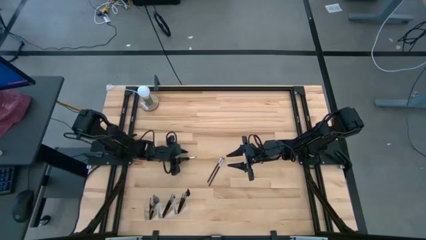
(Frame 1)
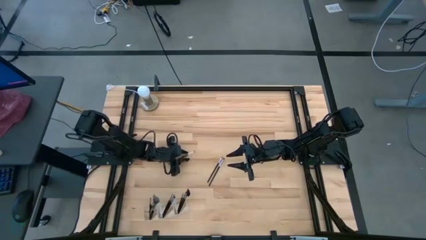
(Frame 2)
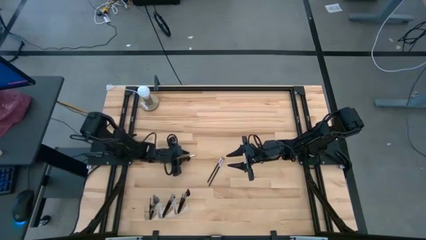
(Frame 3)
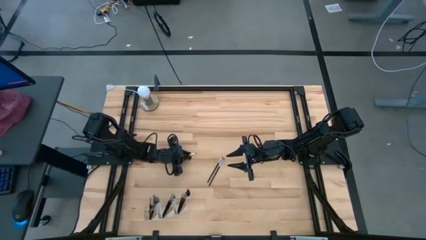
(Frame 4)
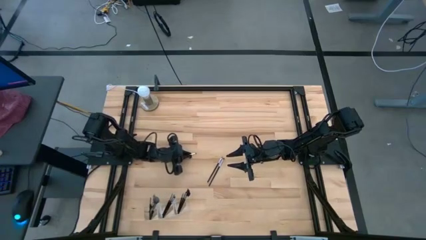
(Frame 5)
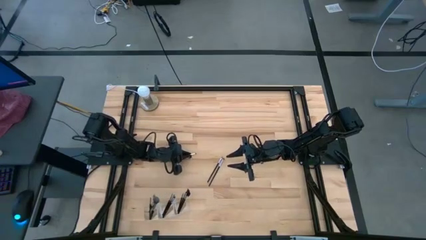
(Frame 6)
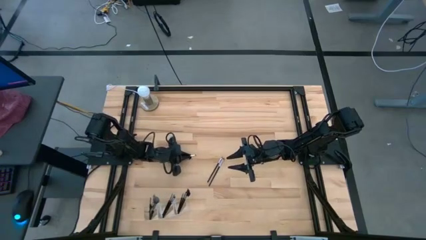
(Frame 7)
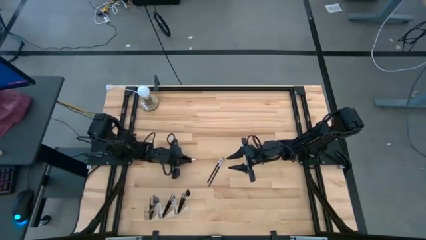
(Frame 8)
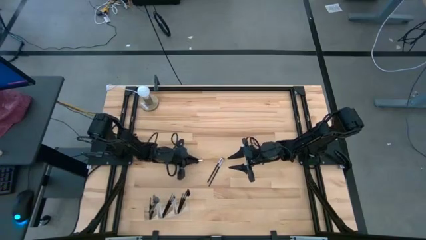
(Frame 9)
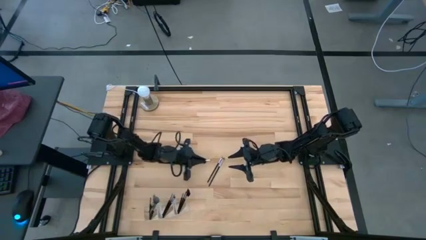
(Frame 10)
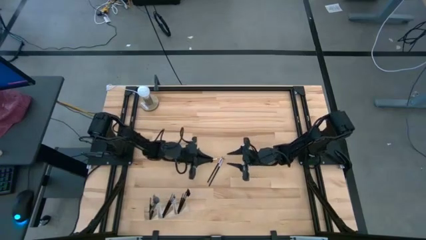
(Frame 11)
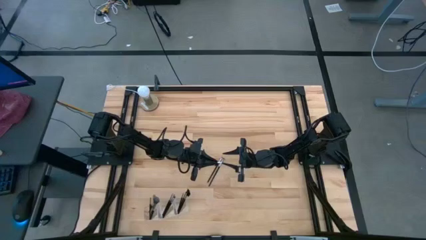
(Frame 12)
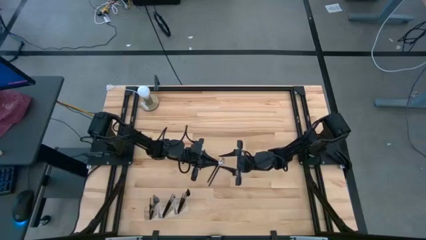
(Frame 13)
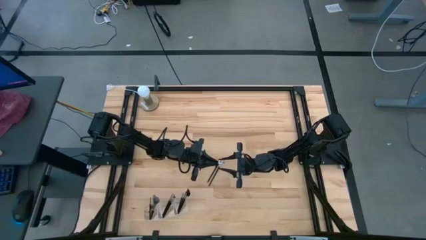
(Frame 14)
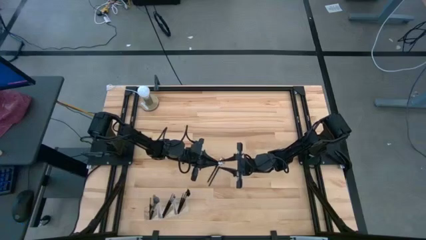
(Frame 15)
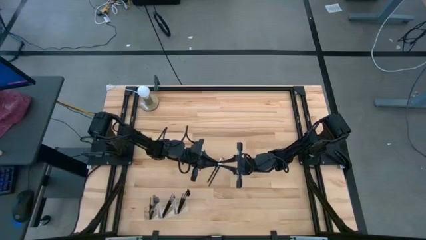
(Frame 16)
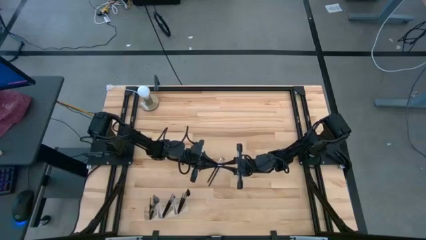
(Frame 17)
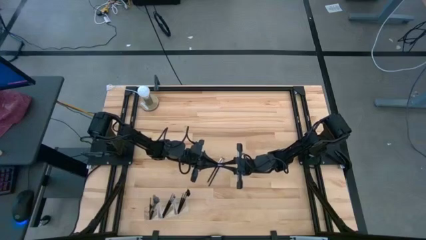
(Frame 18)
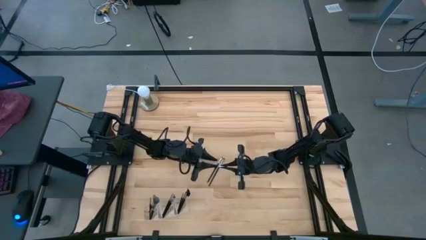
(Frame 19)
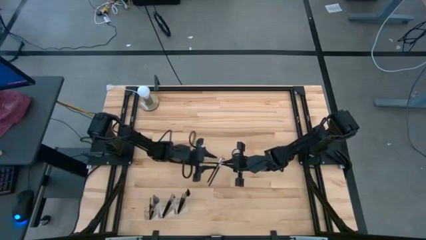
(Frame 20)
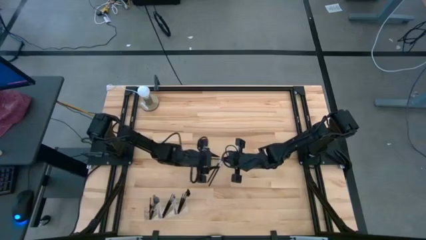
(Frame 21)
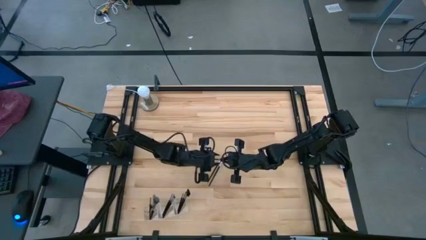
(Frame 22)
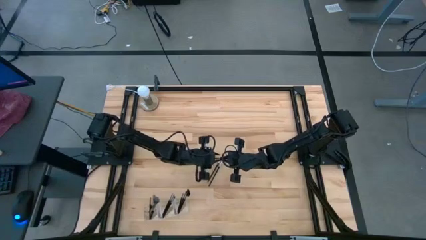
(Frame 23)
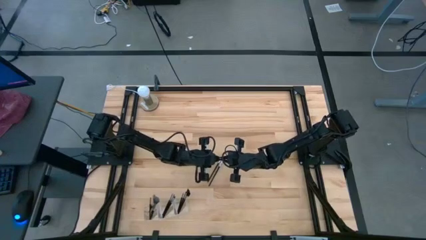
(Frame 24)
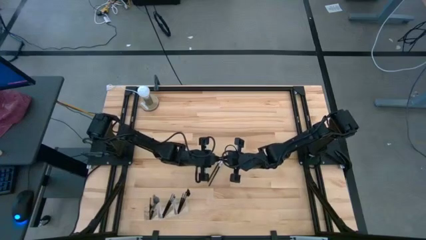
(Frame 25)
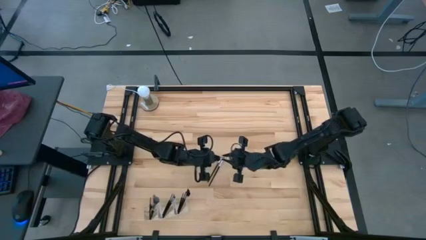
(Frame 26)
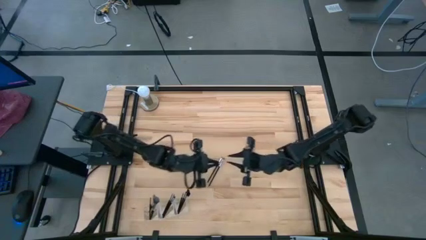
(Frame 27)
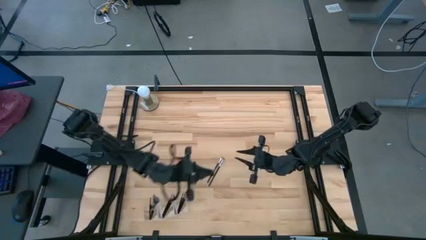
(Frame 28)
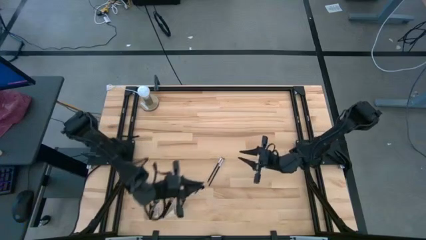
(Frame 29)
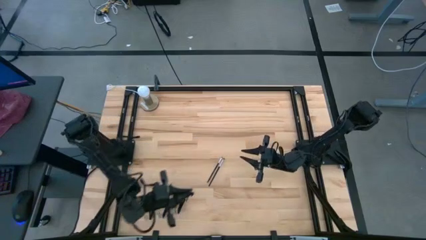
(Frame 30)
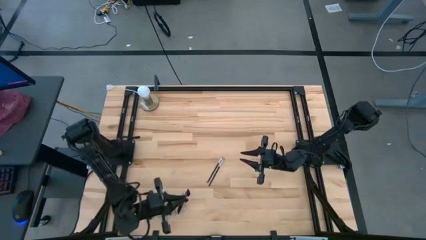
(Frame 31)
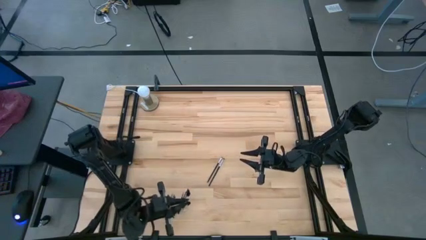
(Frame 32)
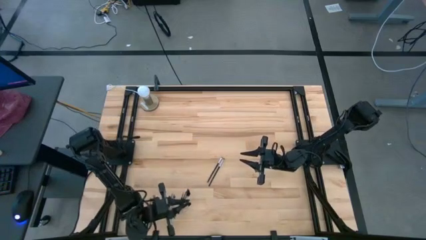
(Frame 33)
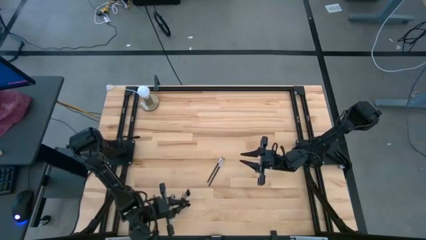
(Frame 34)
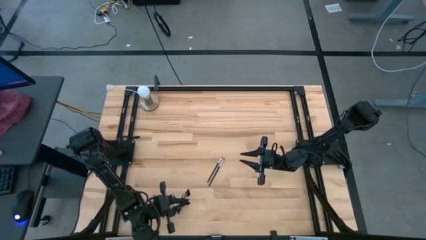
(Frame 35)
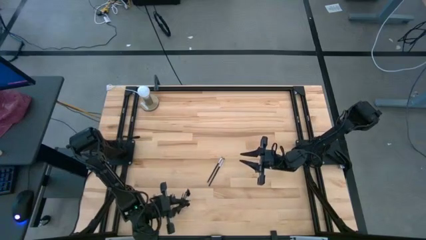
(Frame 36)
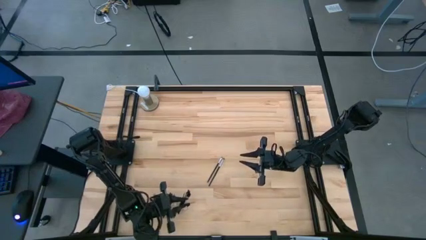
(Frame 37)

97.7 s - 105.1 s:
Task: Put items in baskets/containers
Put the black eyeshadow brush into the transparent organizer

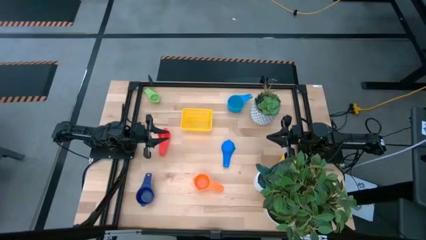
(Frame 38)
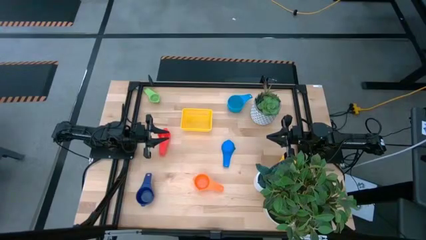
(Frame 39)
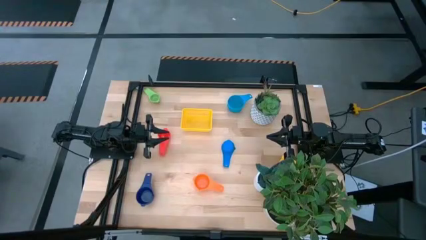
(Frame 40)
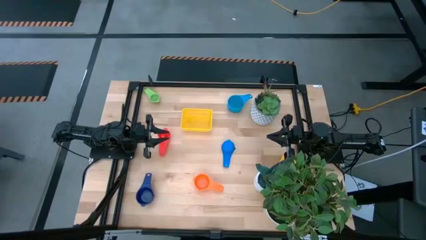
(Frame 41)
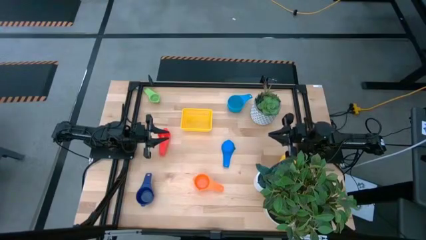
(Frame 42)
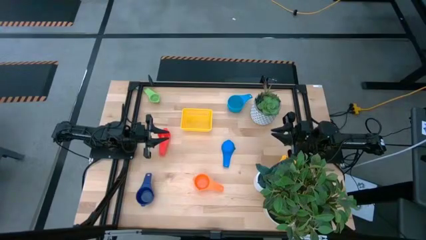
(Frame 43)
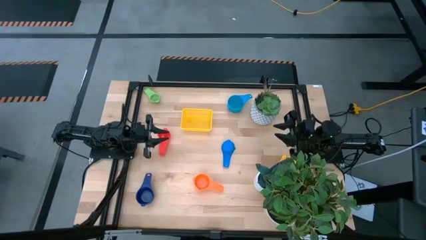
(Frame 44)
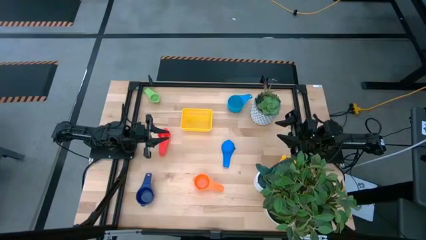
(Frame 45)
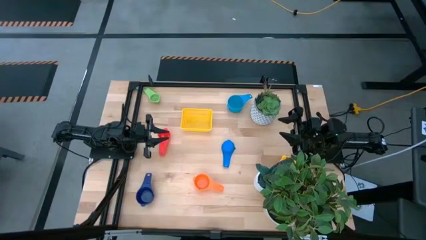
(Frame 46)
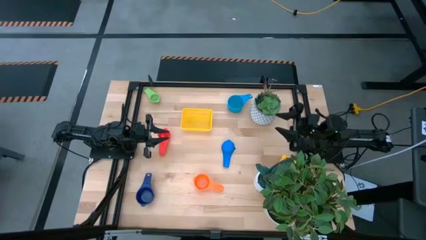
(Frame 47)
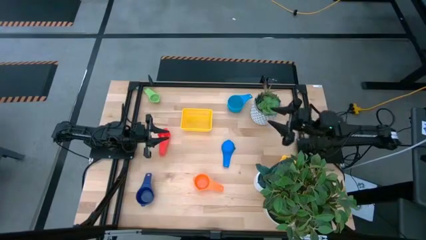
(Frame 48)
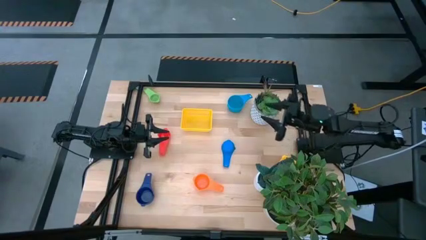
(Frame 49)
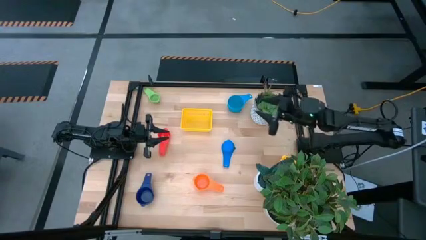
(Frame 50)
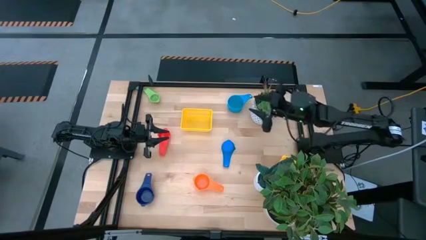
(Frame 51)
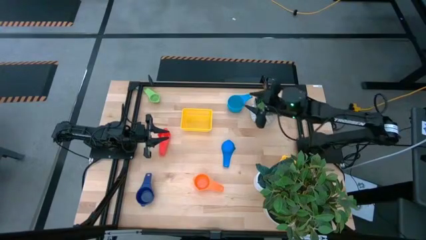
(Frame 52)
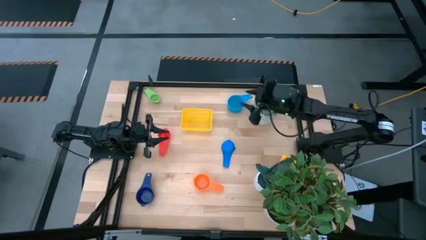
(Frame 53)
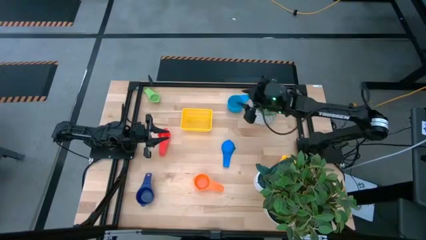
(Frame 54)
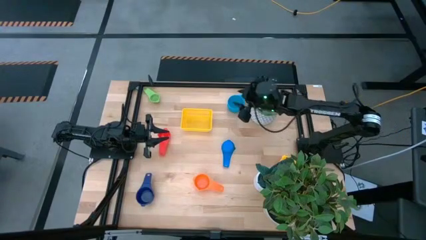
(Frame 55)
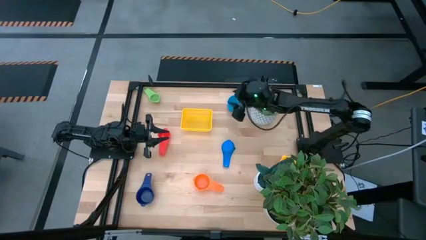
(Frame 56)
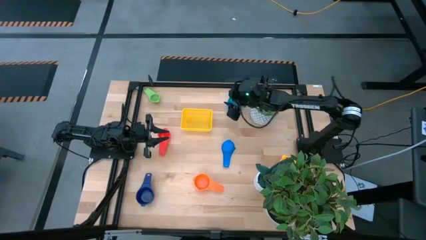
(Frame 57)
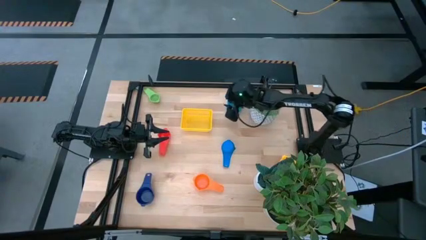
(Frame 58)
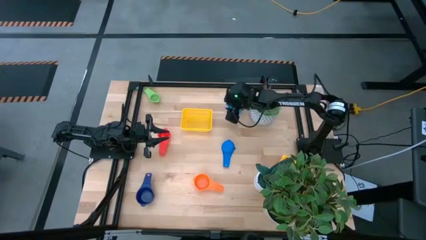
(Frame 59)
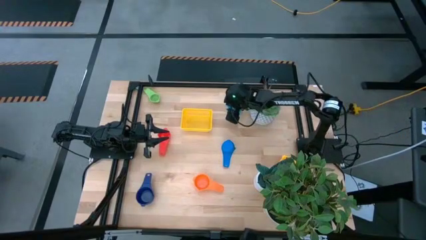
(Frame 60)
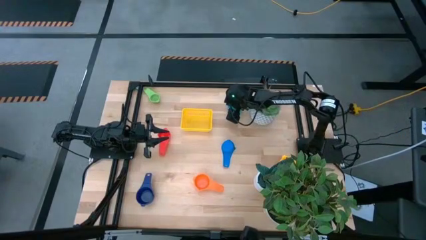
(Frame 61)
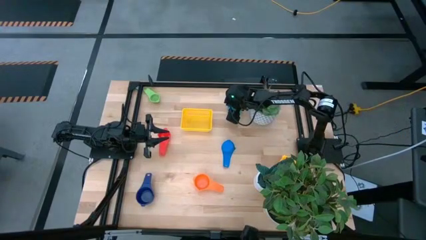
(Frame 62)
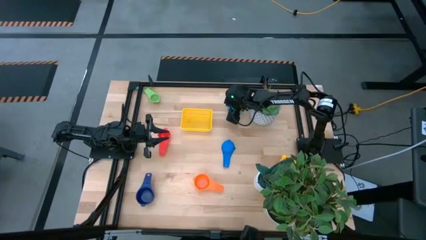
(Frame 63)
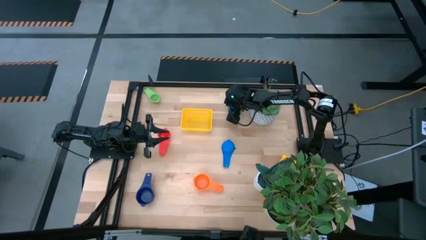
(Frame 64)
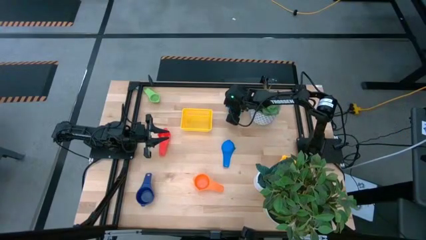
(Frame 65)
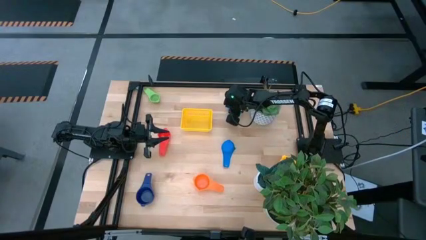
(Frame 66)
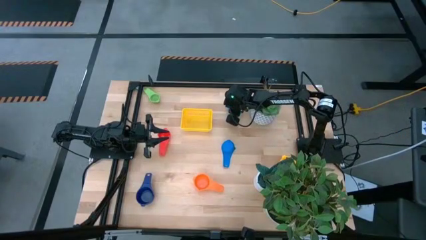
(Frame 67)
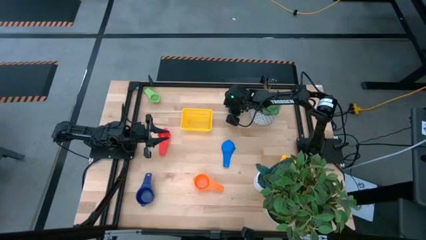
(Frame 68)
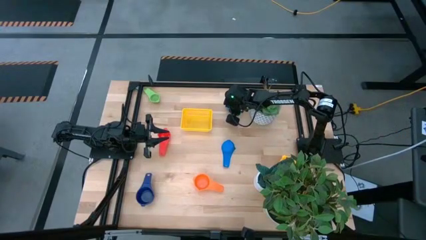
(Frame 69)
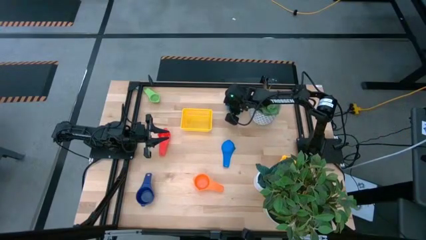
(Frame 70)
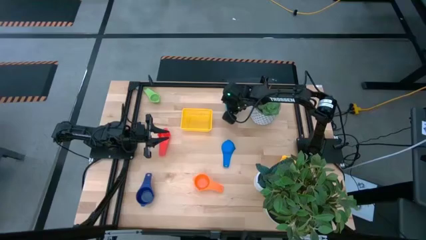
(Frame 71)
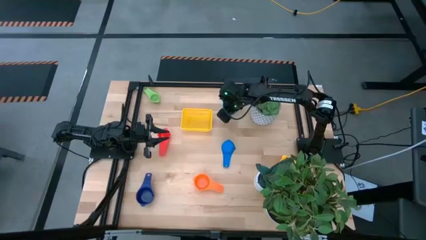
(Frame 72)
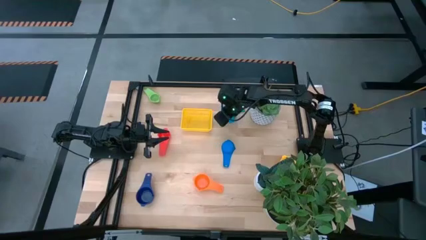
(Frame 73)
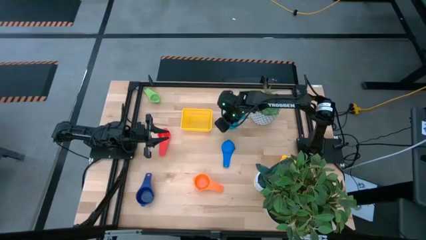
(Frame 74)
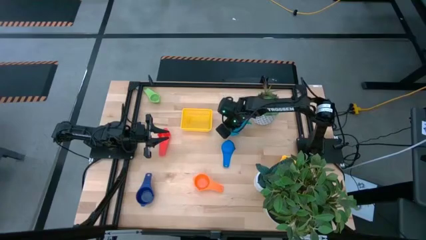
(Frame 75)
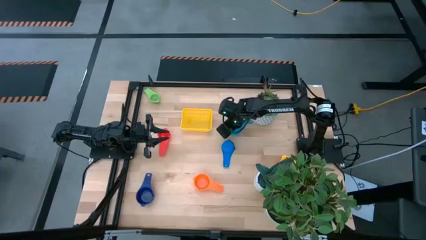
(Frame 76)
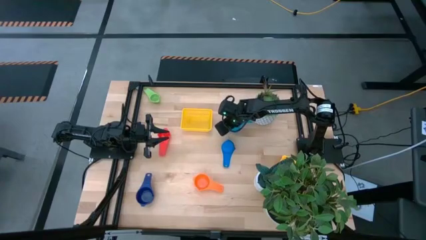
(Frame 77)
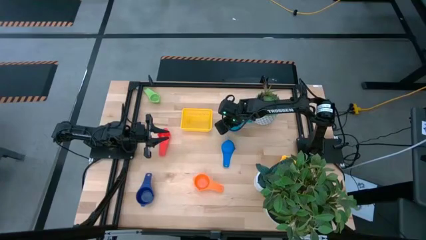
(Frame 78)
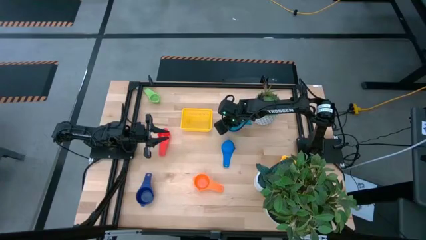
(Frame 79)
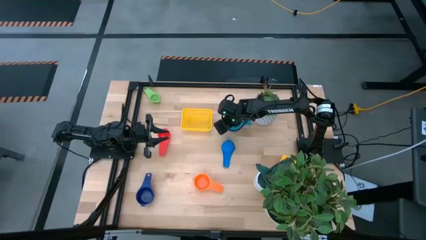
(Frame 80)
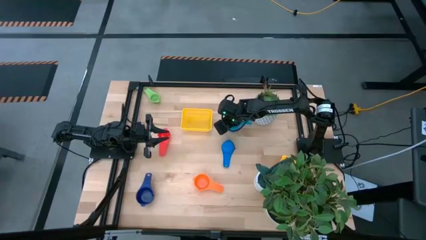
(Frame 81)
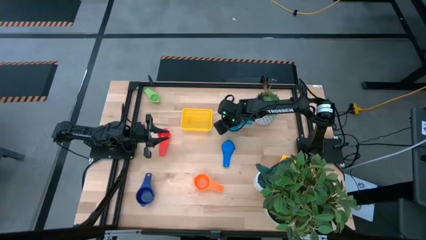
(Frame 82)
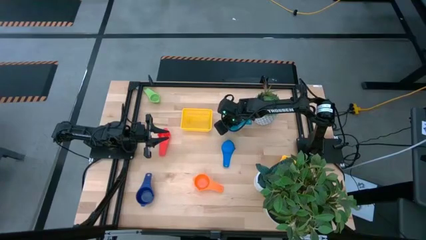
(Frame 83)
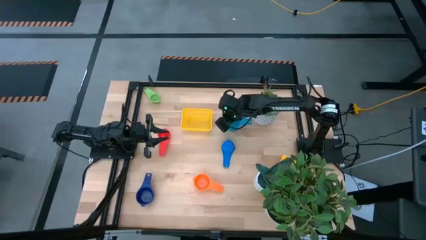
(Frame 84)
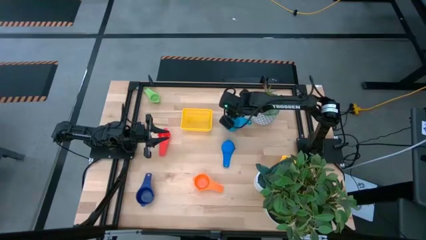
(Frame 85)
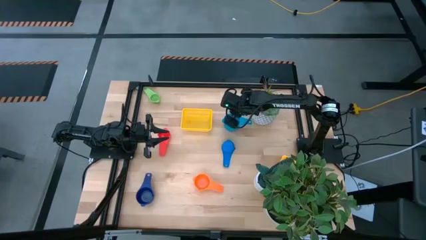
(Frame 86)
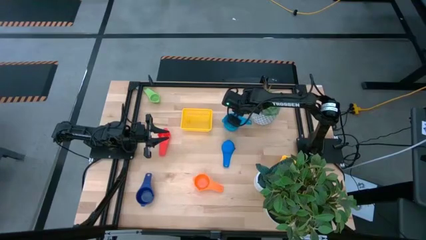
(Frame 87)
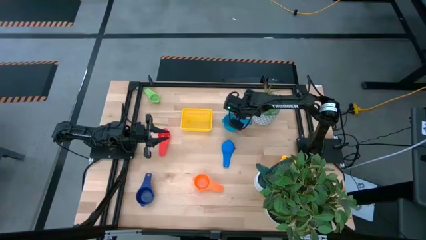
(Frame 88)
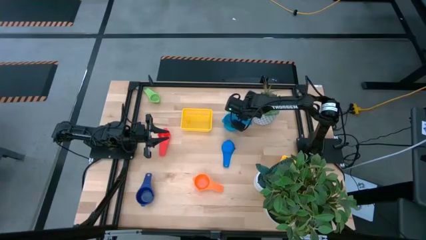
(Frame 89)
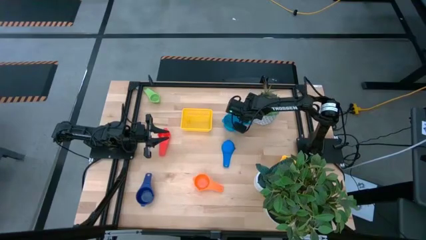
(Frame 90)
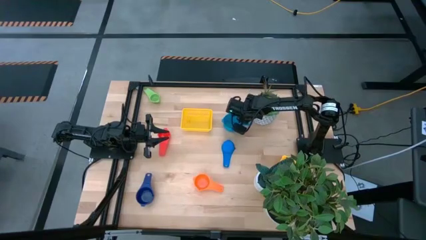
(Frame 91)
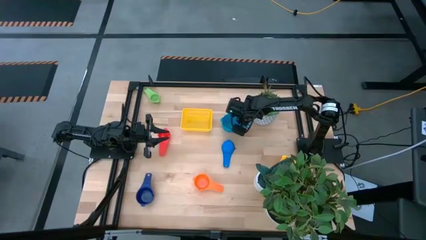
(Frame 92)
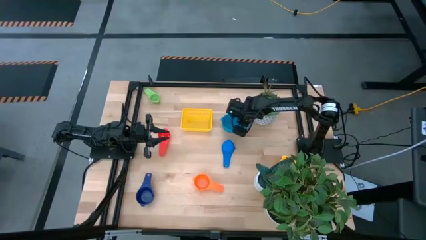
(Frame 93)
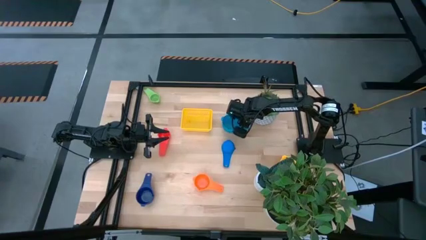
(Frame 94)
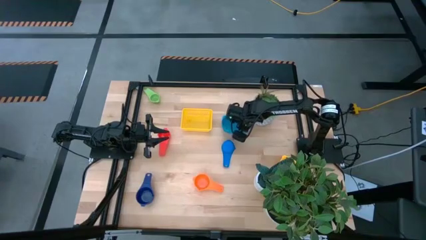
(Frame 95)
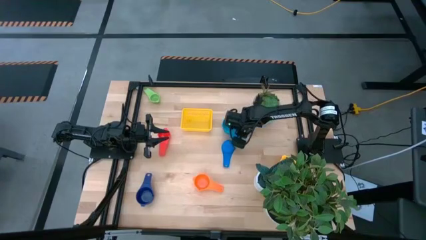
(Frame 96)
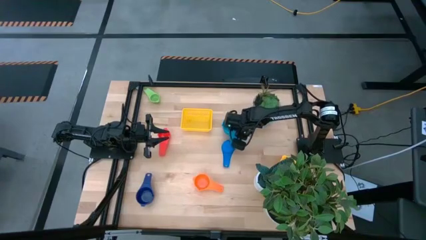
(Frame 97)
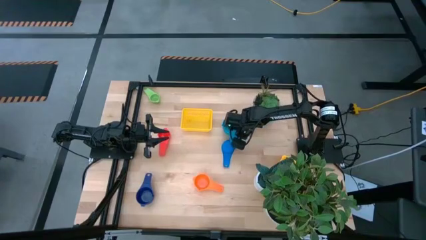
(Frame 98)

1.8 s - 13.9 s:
Task: Nest measuring cups in basket
Prepare the light blue measuring cup
